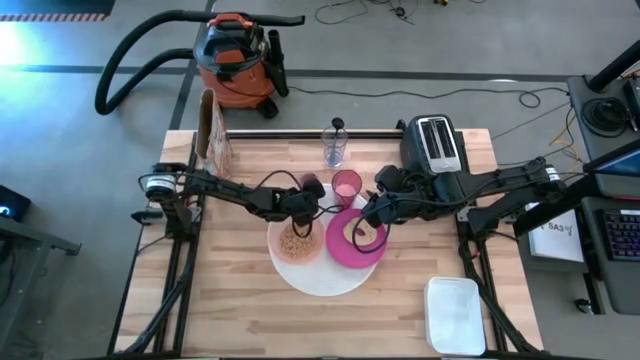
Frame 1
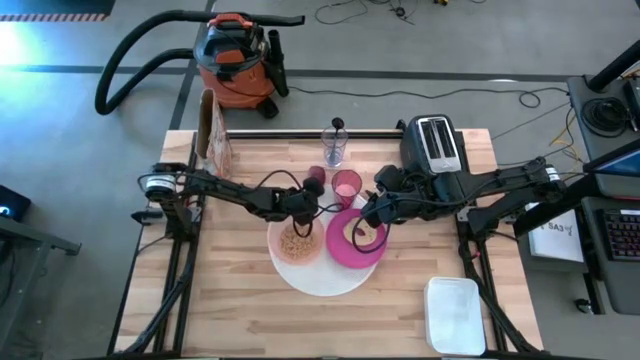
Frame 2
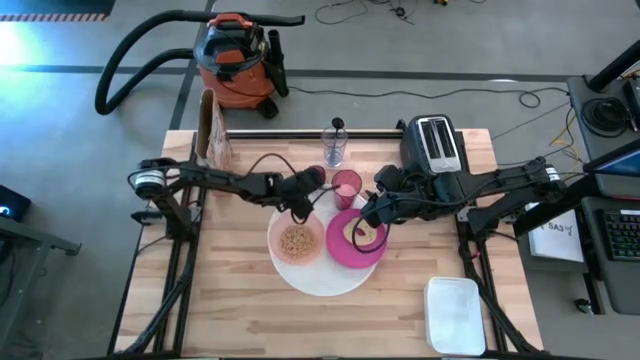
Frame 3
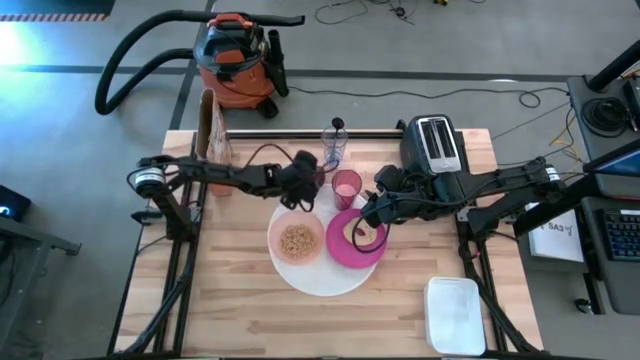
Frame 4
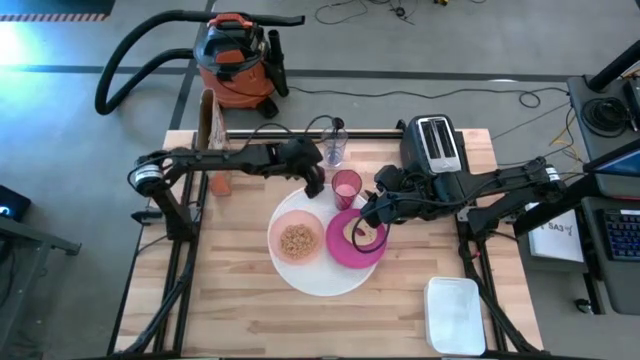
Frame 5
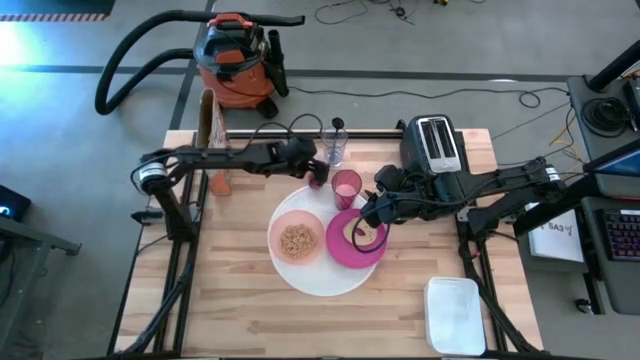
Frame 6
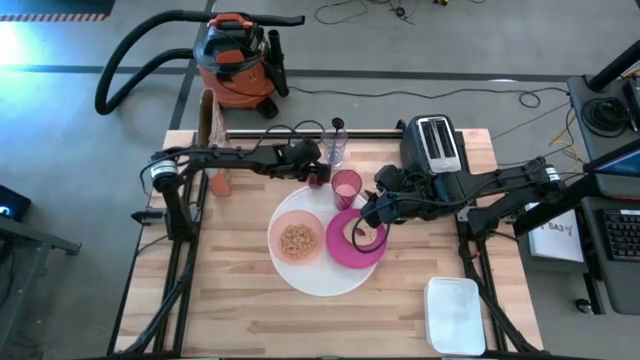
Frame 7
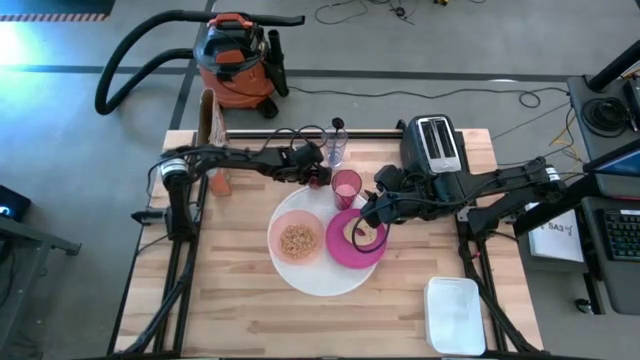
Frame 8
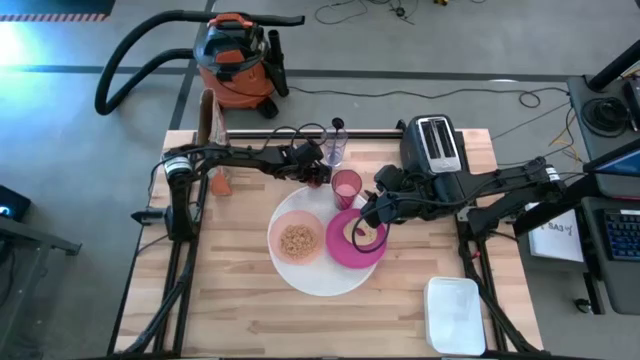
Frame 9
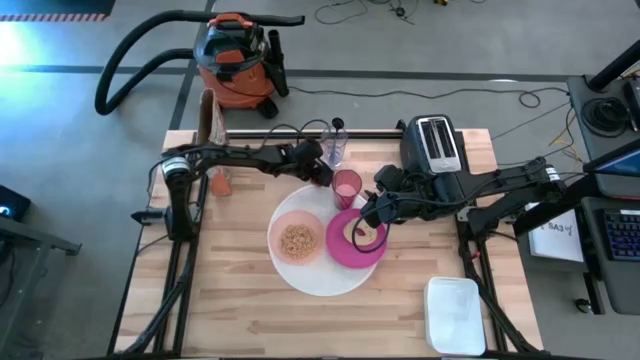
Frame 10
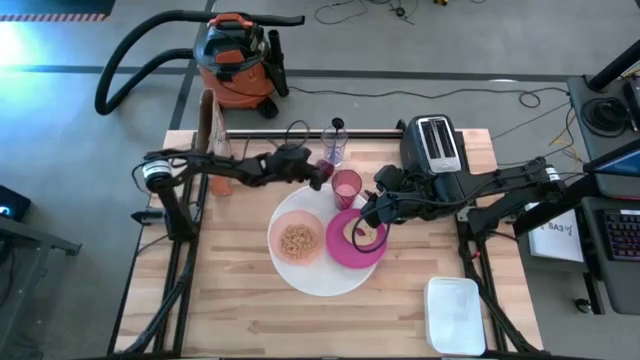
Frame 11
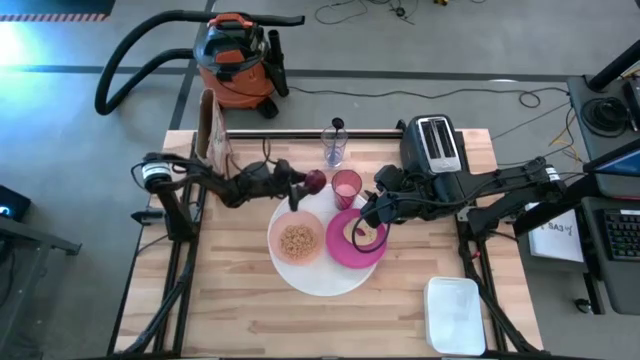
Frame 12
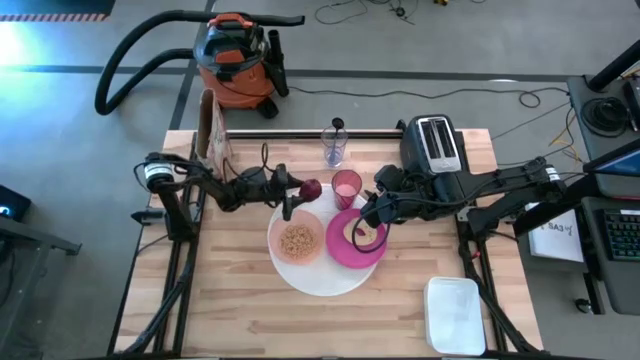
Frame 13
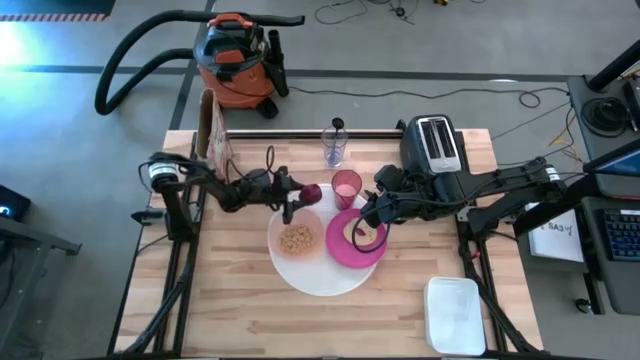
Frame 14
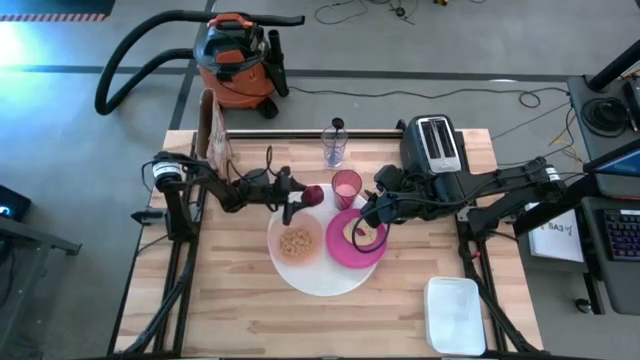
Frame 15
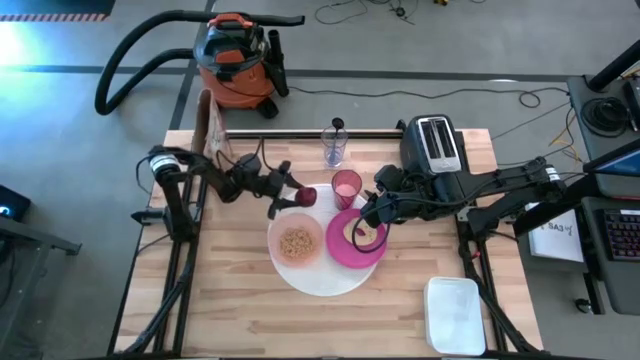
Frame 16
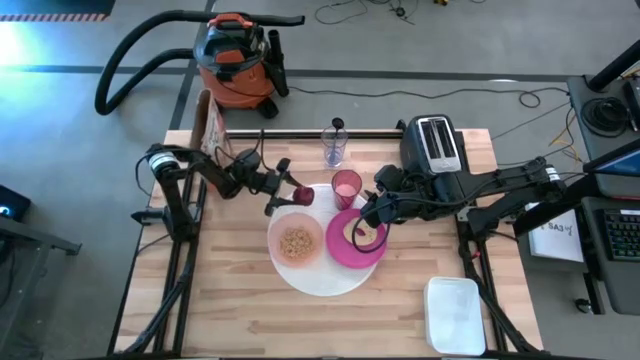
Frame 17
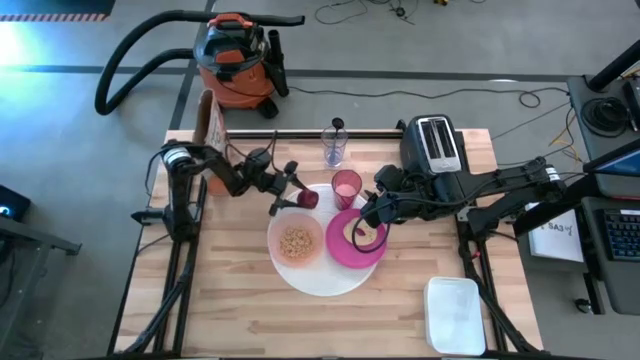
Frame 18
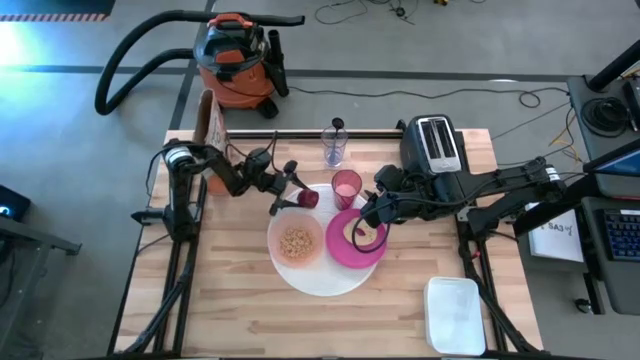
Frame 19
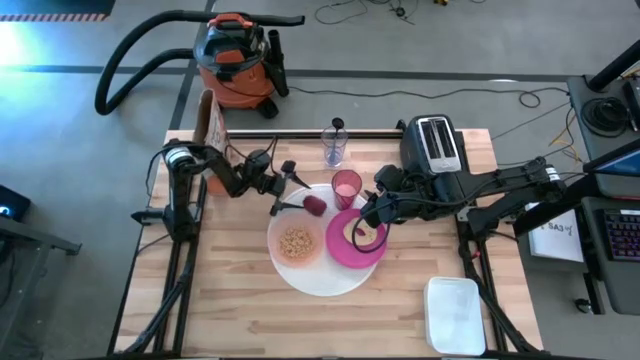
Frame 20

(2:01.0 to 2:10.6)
Task: Arrange a breakfast setting
Put the red apple on the white table mat at the top right of the orange bowl

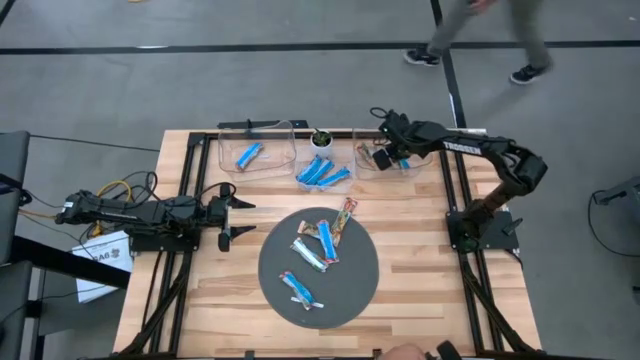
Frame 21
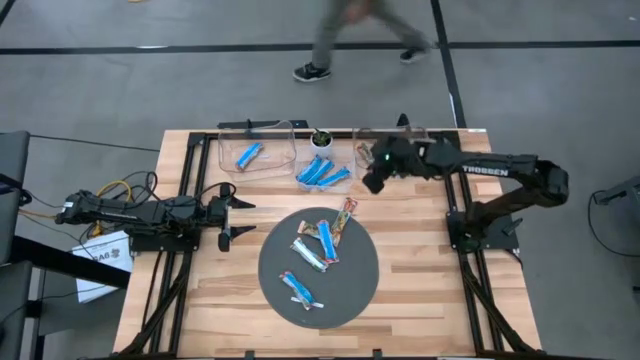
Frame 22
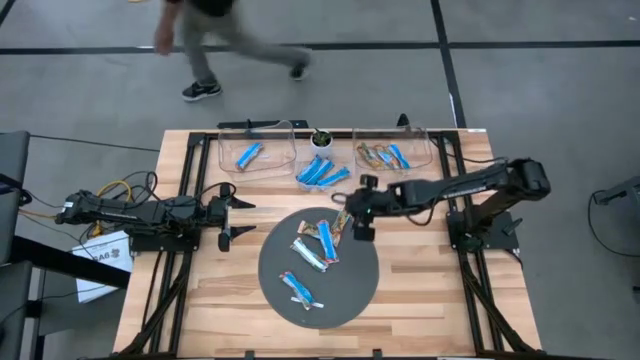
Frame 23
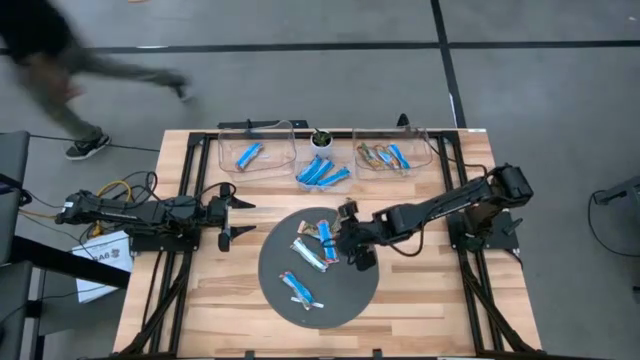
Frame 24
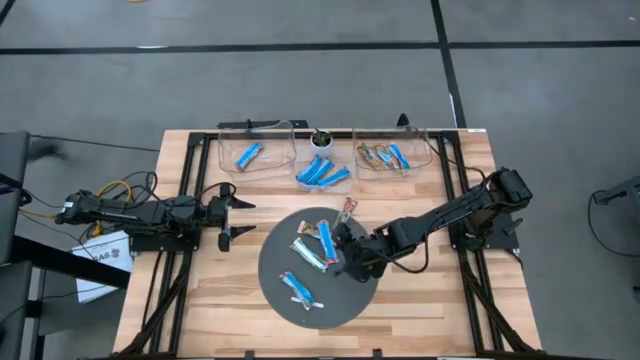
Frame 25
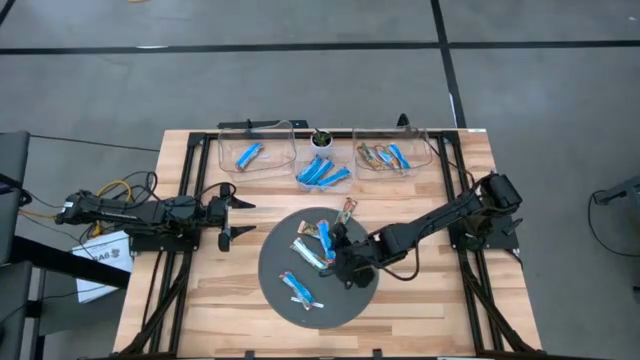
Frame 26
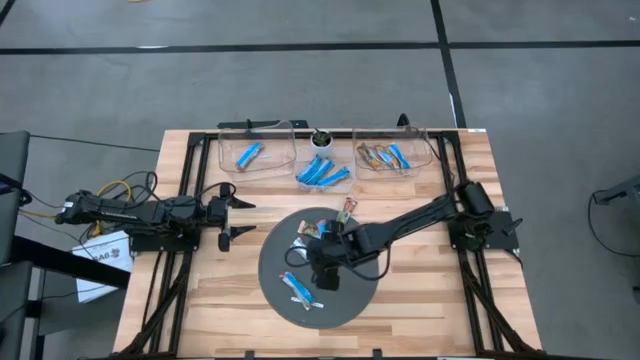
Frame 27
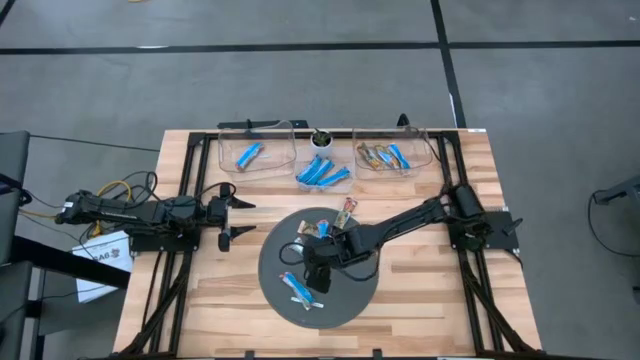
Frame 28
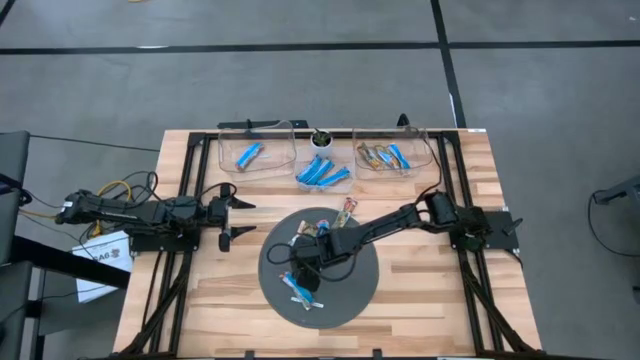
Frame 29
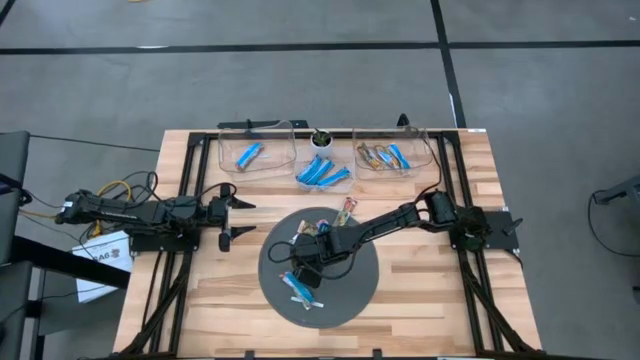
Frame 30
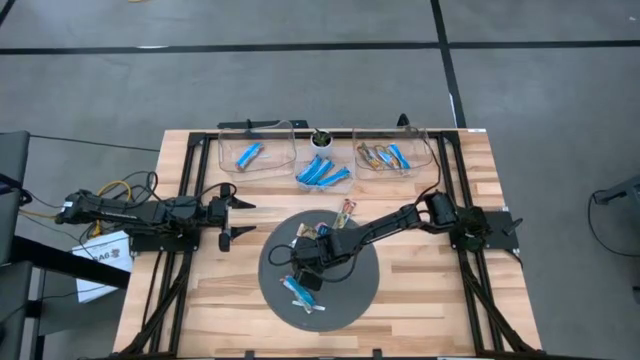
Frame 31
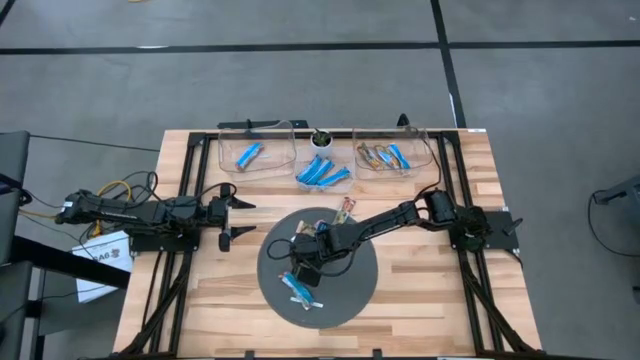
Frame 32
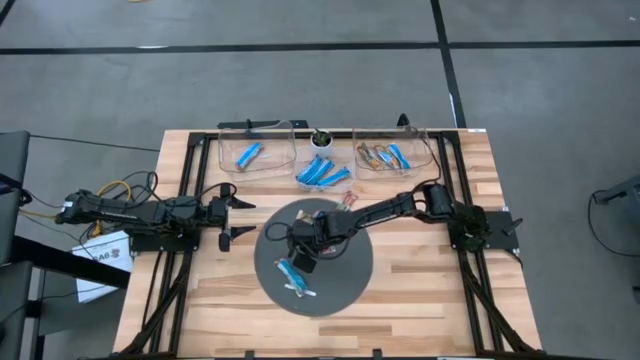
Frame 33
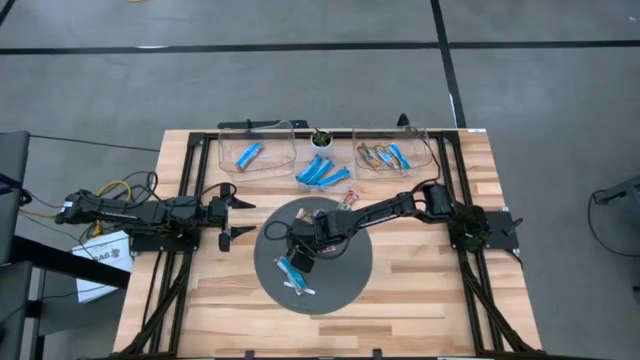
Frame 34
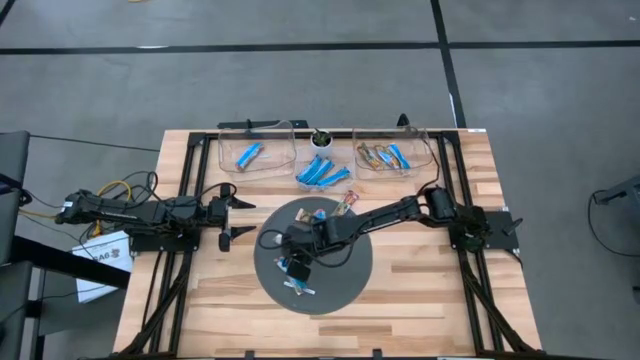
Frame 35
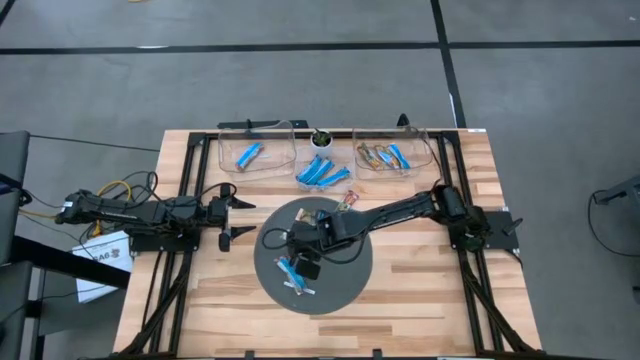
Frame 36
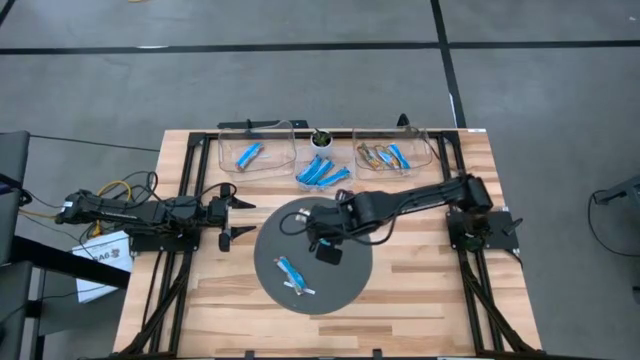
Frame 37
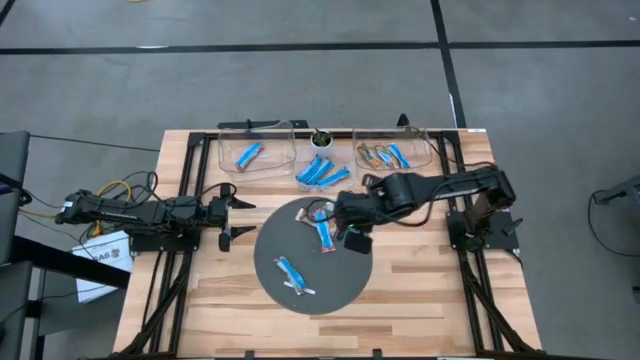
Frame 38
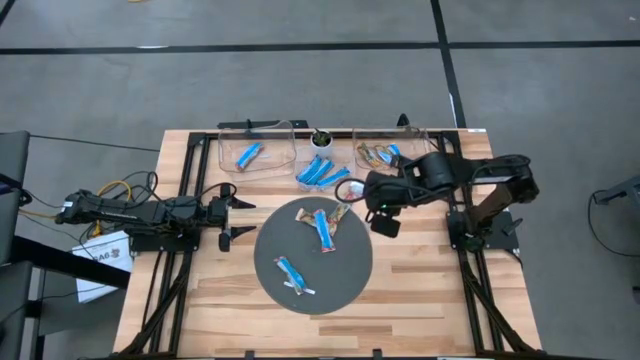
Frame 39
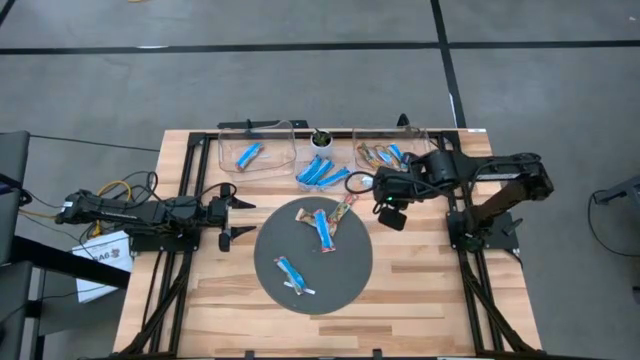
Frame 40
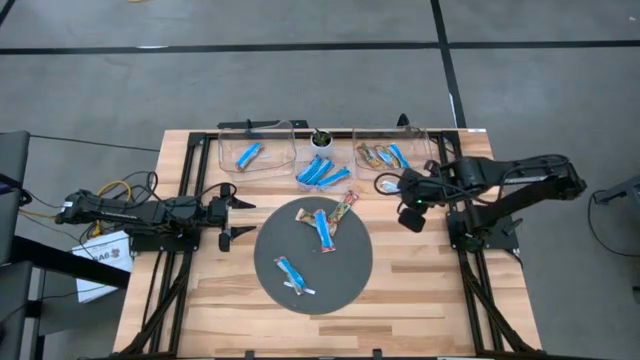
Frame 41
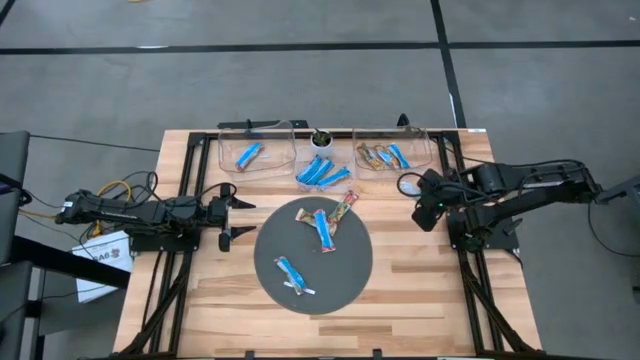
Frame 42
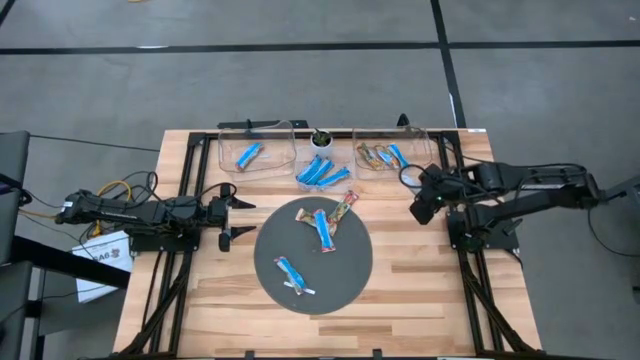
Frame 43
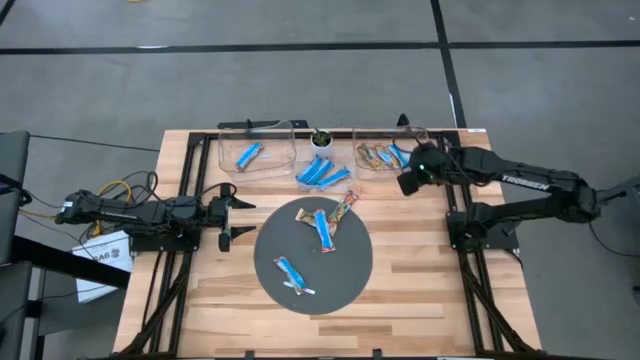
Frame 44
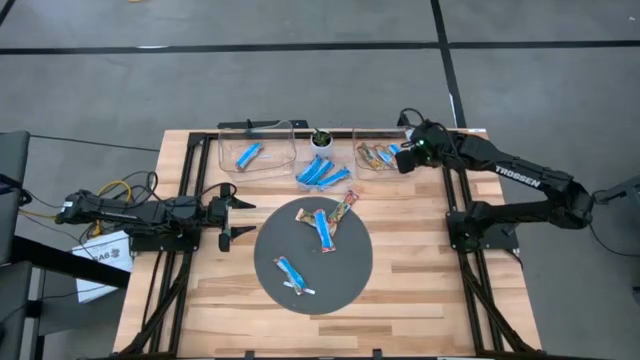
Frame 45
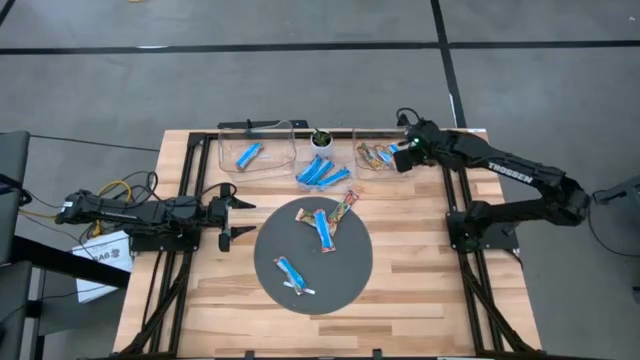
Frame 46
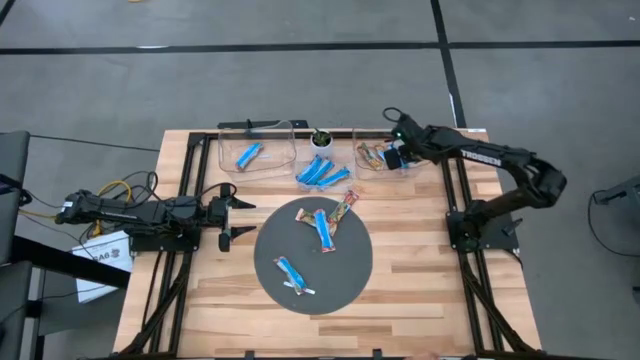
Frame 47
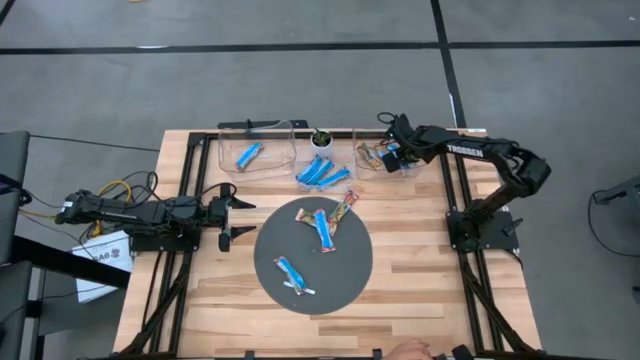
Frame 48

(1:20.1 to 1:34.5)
Task: Pick and place Granola Bars by type
Put the yellow granola bar into the right transparent bin
